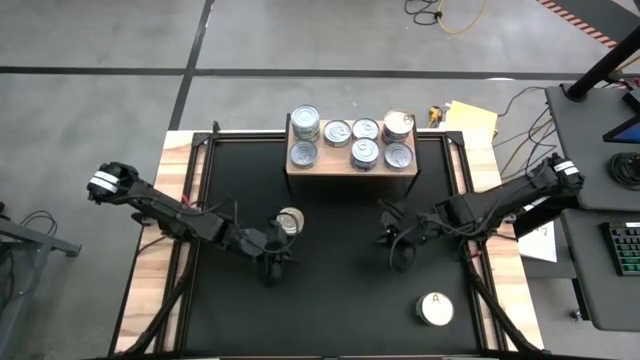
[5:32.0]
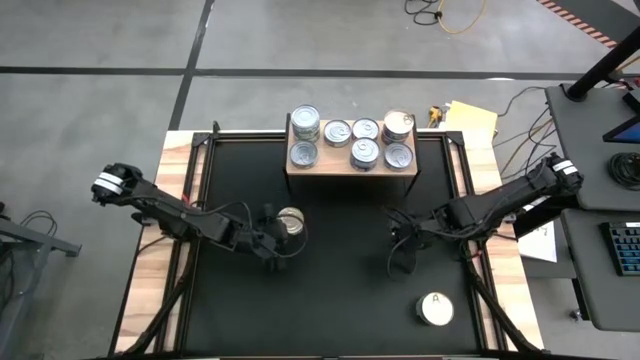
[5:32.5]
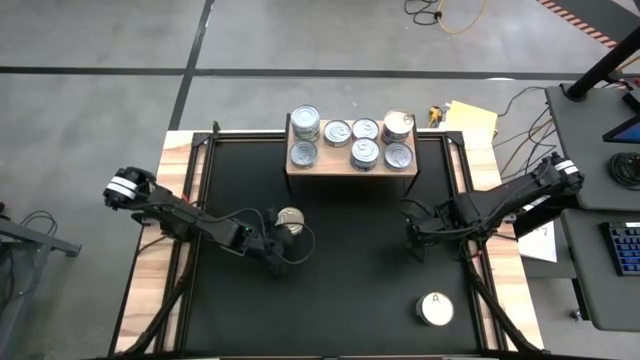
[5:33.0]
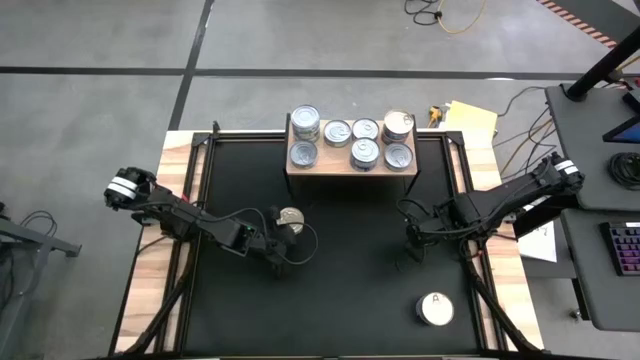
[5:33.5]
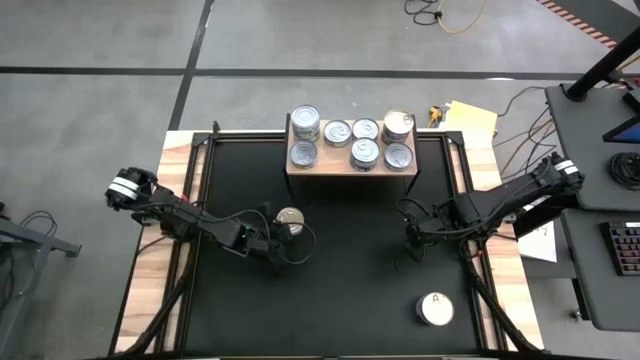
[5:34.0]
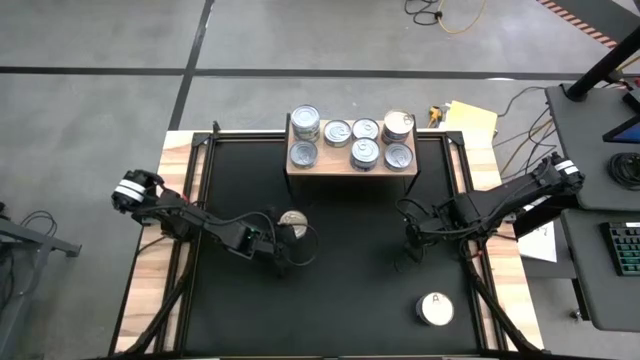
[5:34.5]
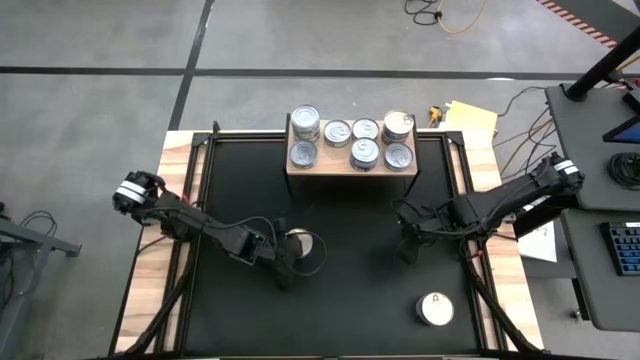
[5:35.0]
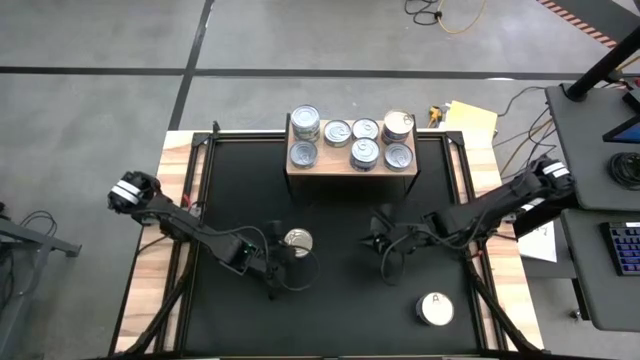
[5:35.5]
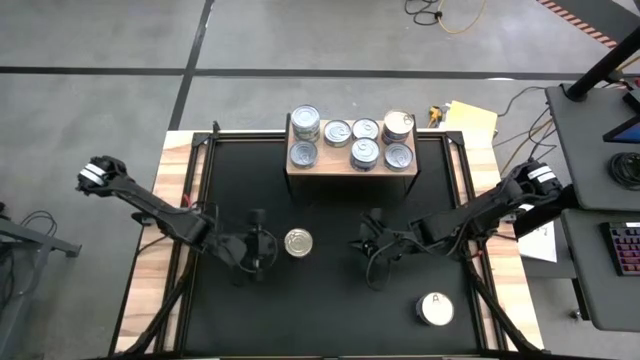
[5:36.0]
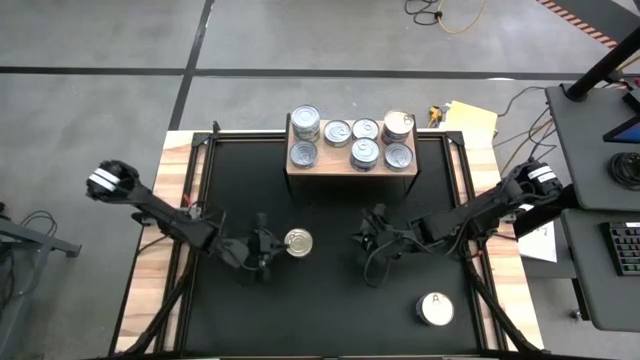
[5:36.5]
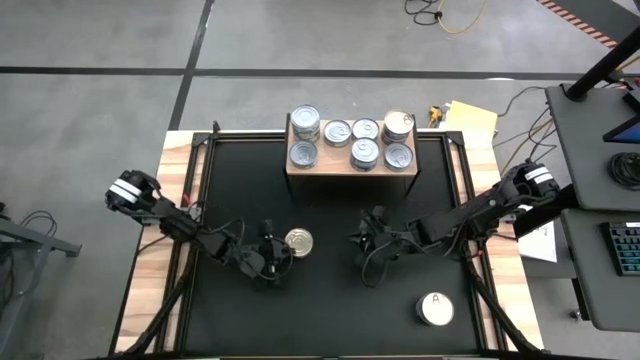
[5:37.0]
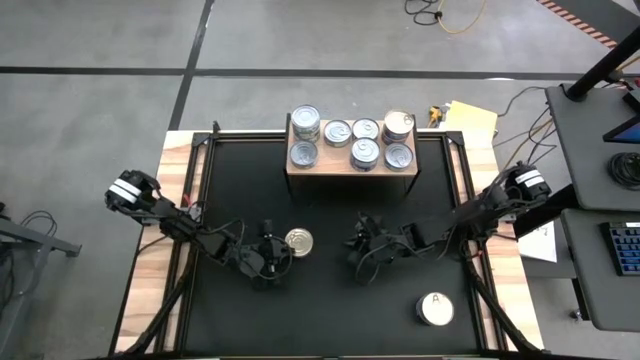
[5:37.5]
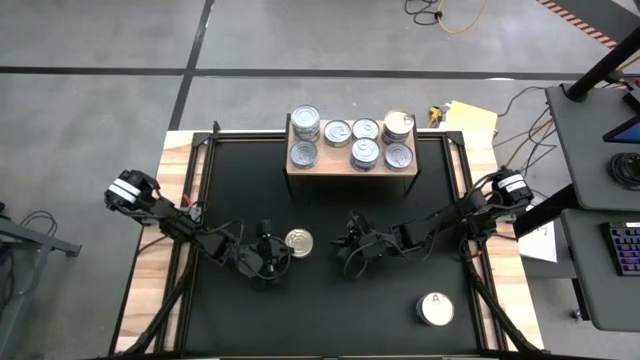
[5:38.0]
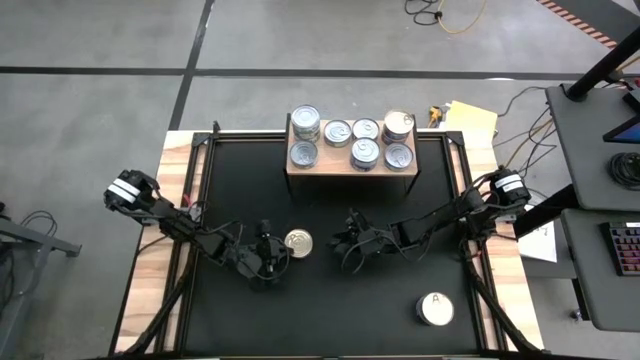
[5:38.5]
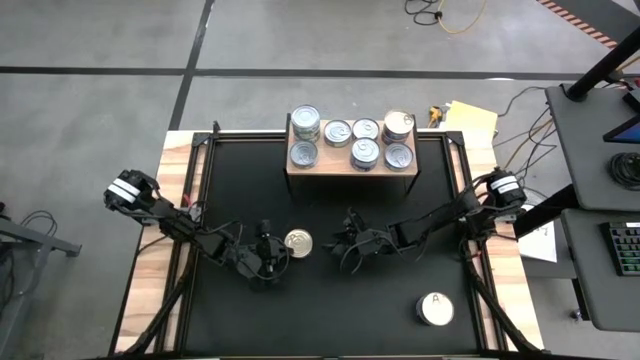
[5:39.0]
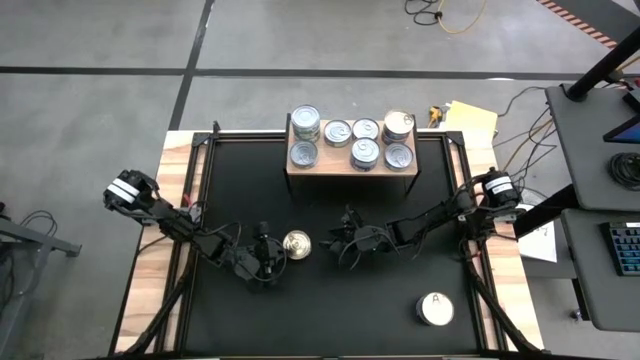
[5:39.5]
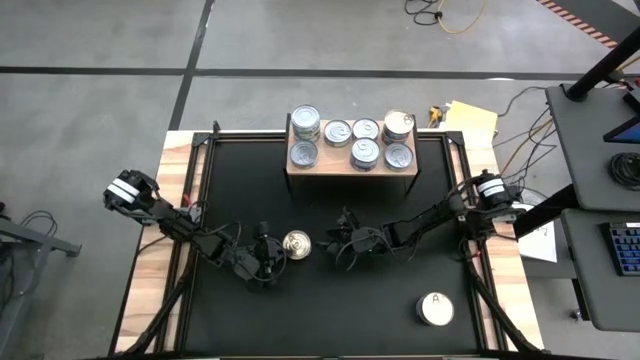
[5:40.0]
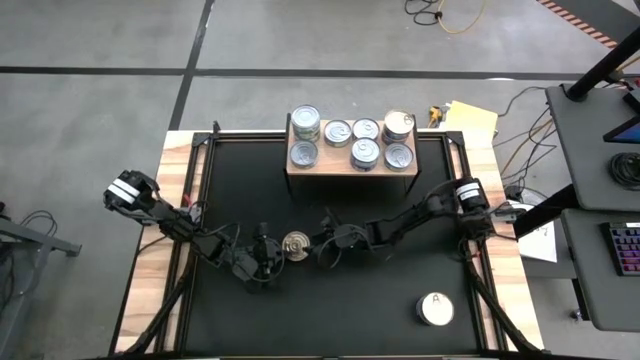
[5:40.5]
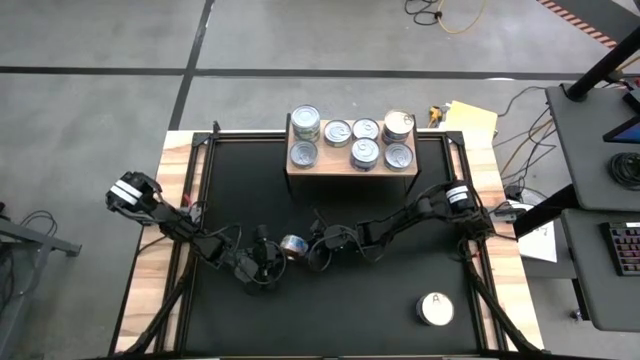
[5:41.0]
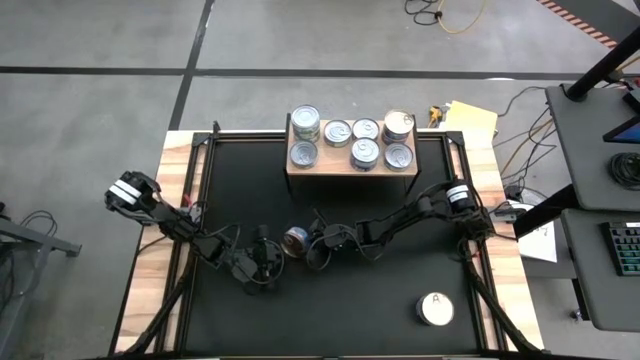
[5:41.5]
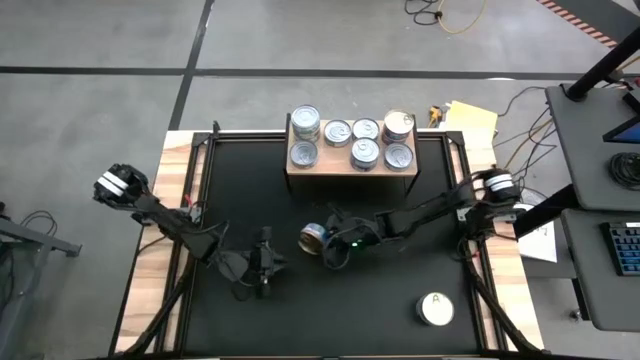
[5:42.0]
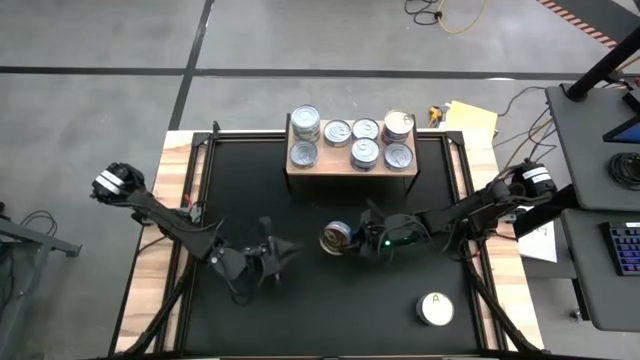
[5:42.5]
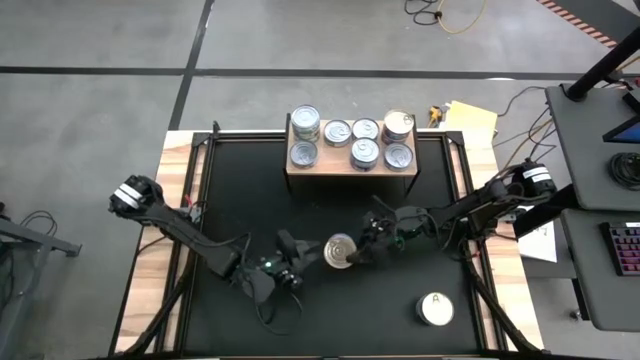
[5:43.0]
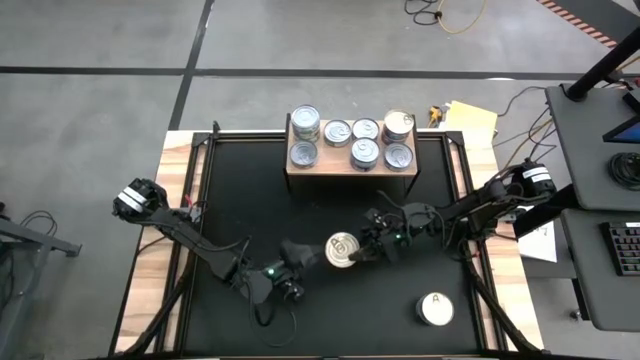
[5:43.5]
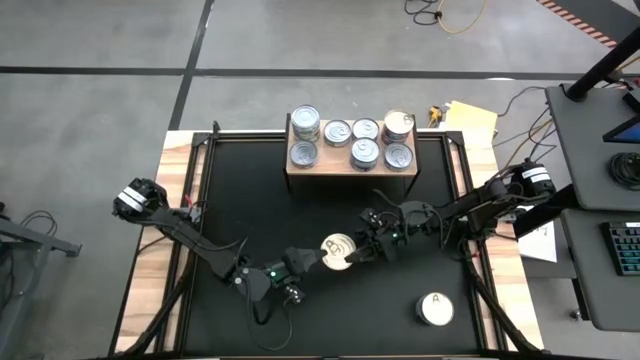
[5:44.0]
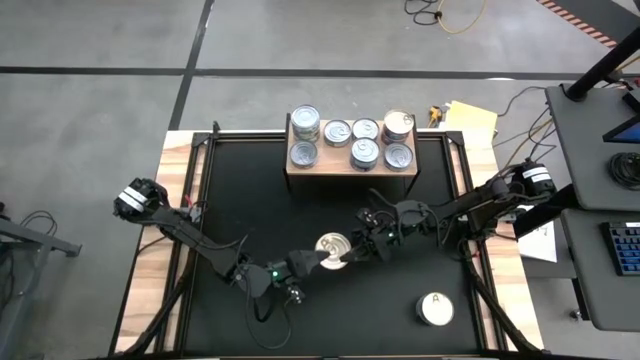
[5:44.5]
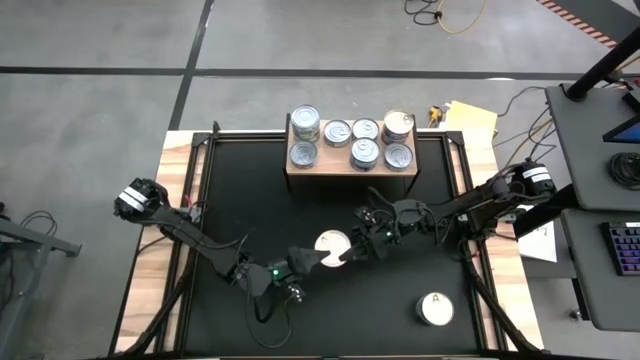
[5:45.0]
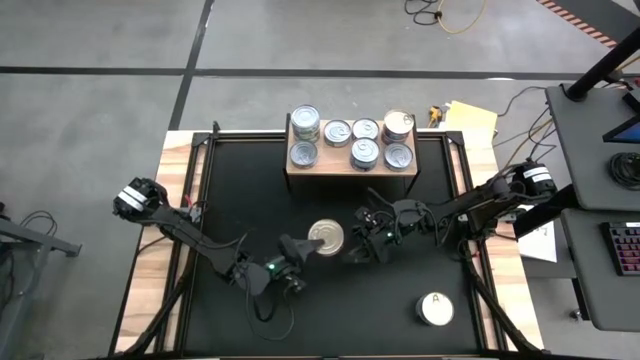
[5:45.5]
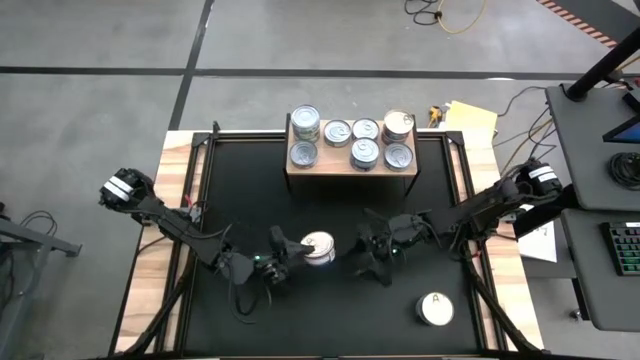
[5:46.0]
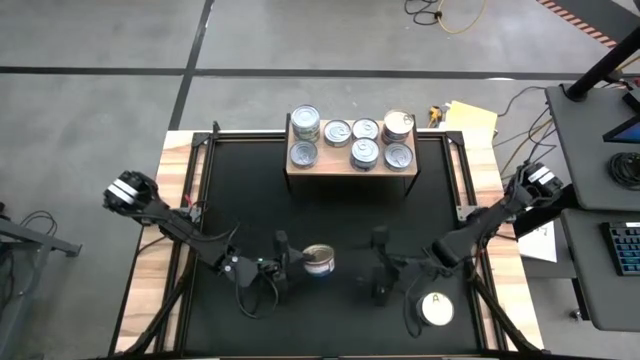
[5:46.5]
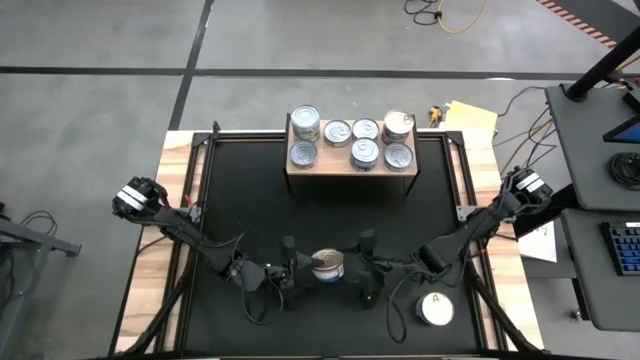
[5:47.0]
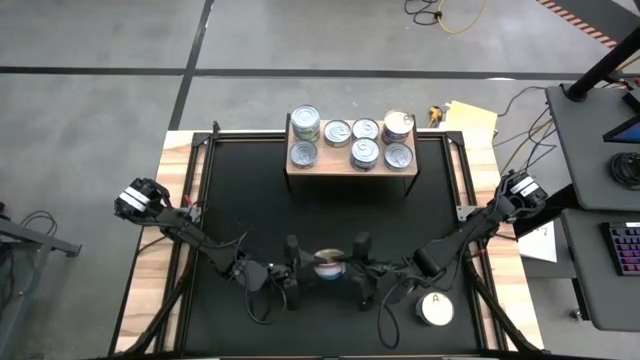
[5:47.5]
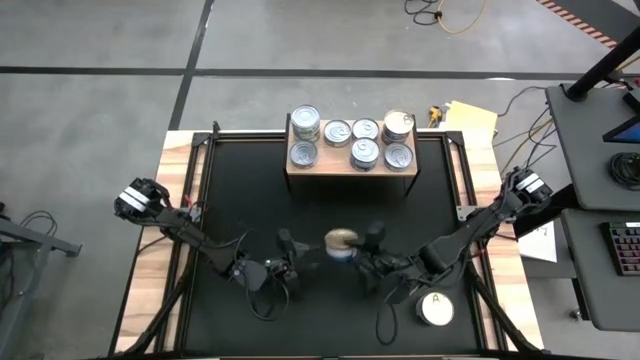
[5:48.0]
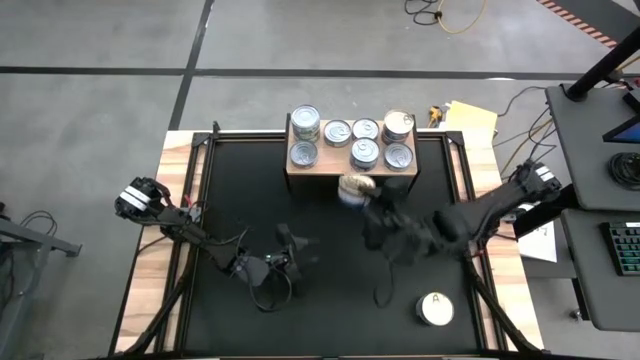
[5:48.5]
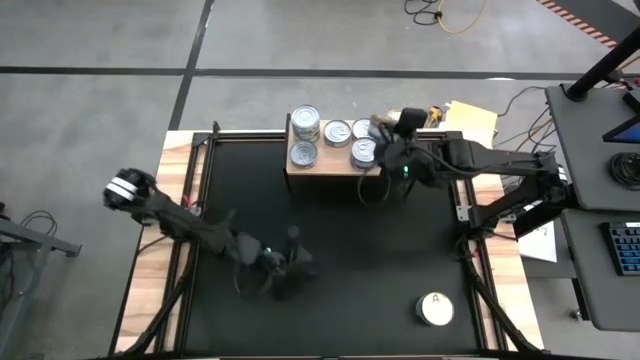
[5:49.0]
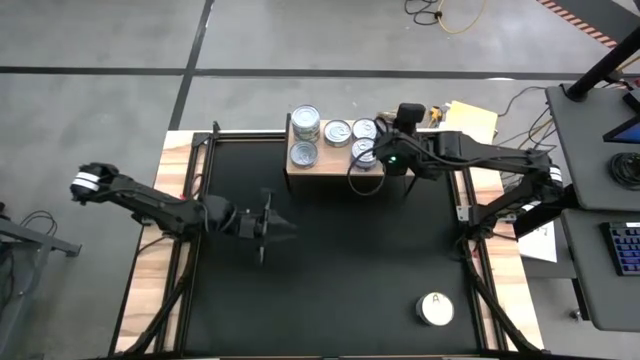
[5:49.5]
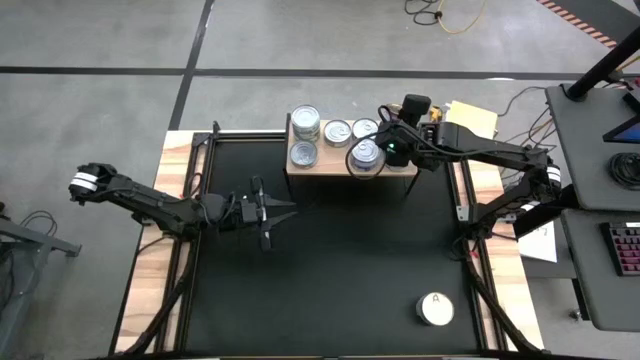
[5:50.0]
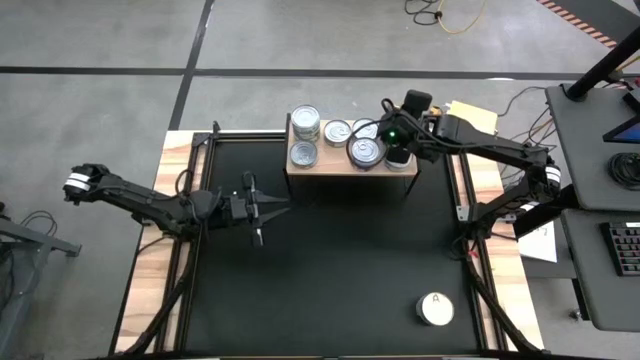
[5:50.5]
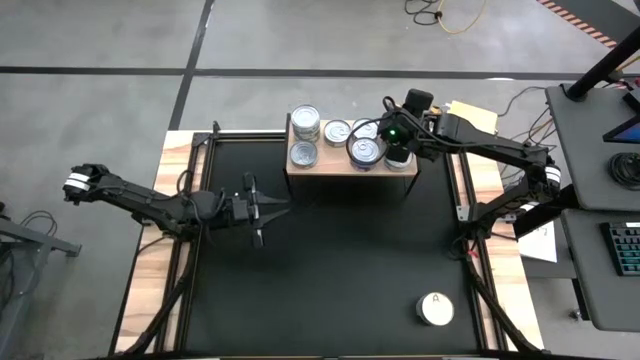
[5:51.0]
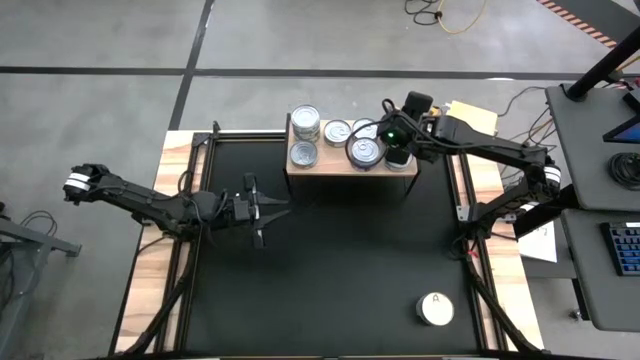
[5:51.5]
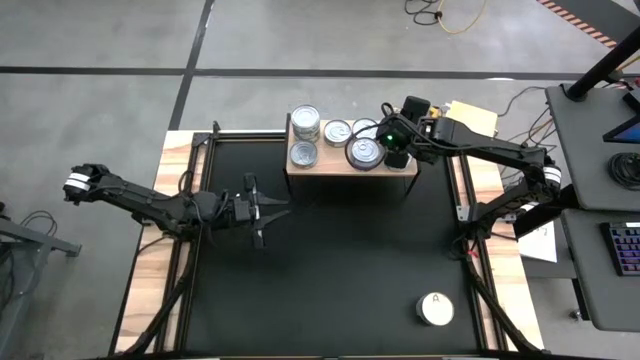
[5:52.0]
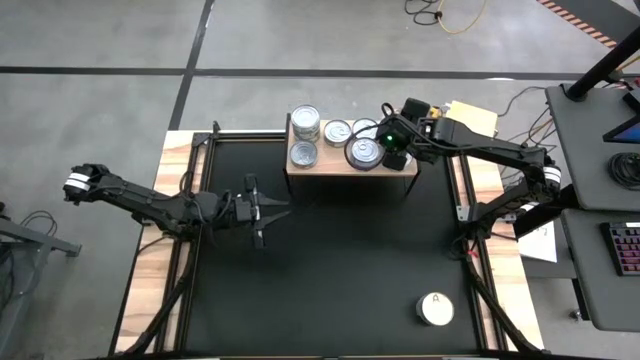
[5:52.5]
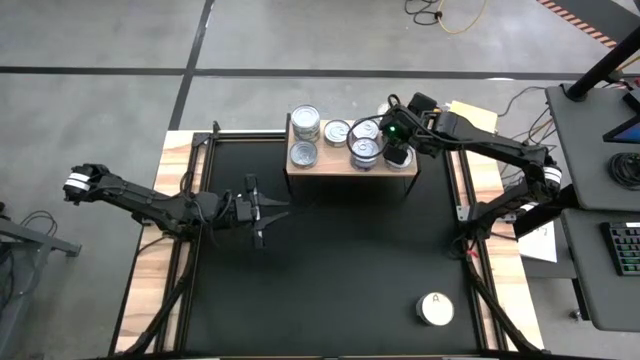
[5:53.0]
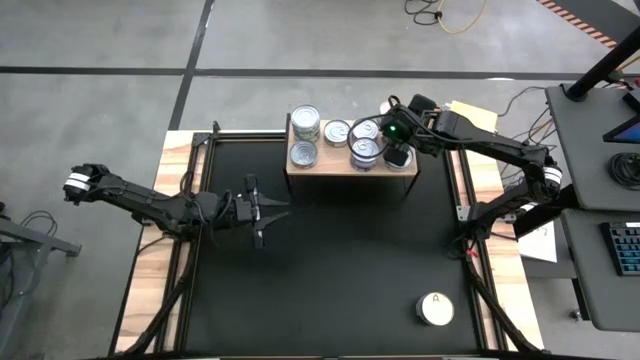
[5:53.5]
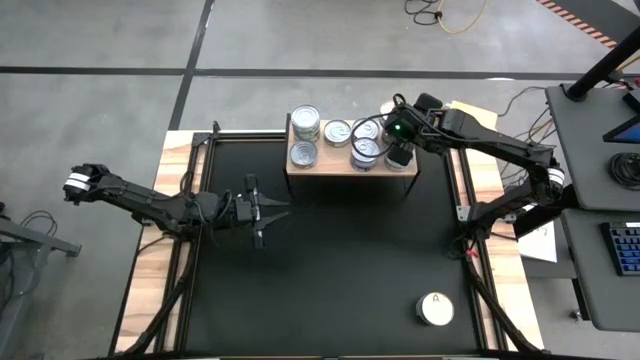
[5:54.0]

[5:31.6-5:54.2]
Task: Stack canned seafood by type on shelf
Stack the blue pink tuna can on top of the blue pink tuna can on the shelf
